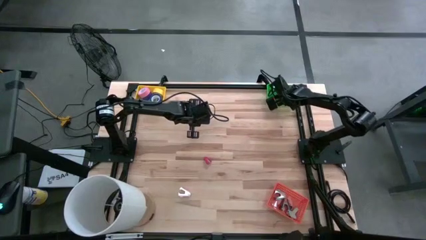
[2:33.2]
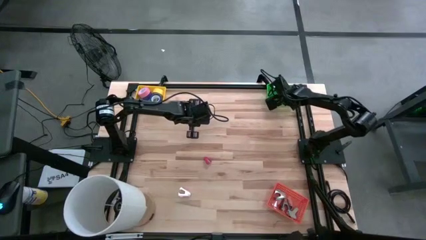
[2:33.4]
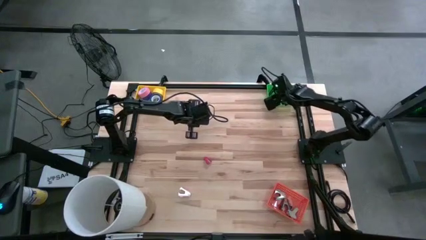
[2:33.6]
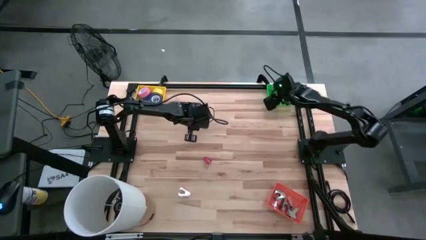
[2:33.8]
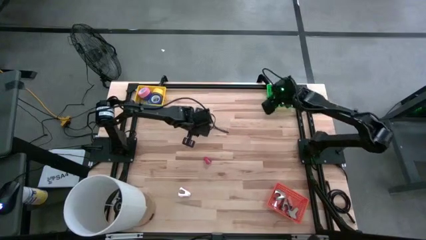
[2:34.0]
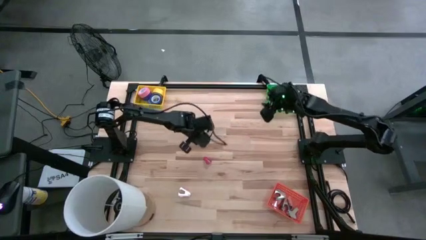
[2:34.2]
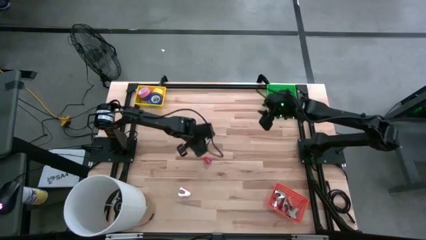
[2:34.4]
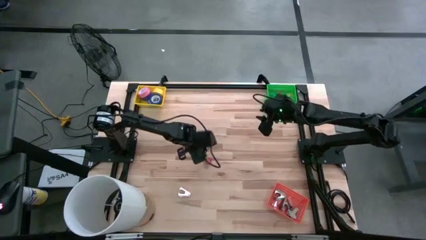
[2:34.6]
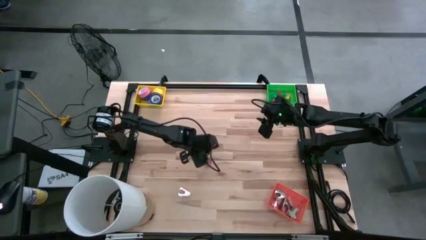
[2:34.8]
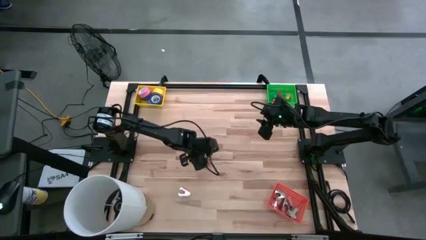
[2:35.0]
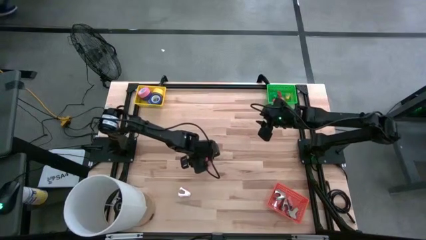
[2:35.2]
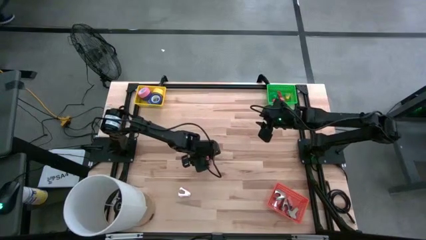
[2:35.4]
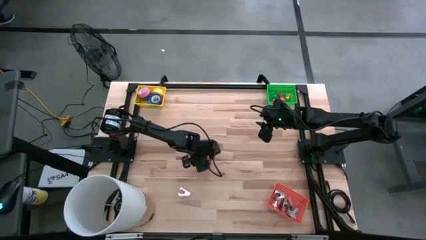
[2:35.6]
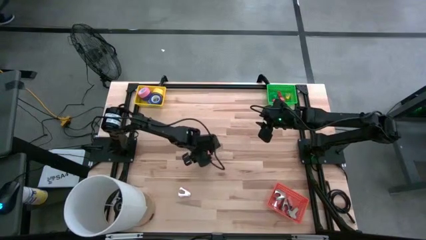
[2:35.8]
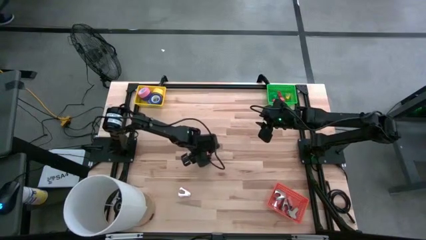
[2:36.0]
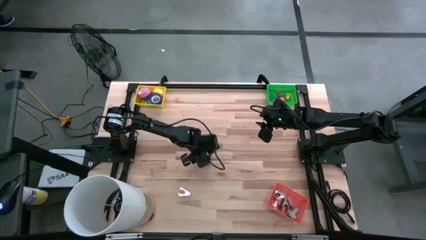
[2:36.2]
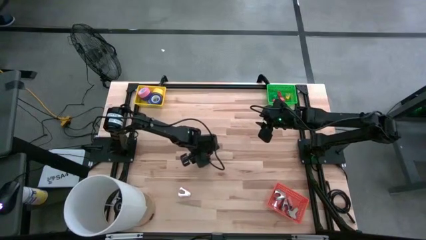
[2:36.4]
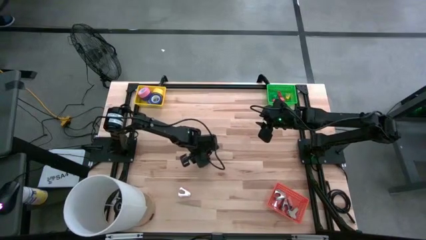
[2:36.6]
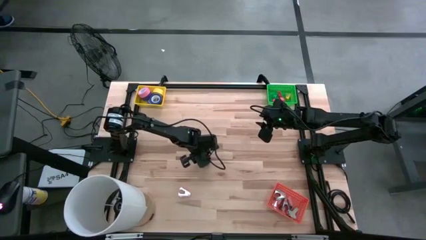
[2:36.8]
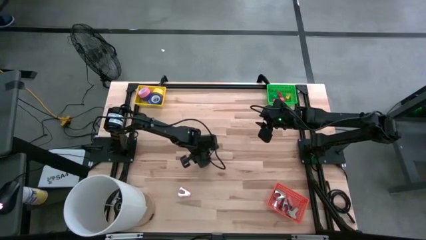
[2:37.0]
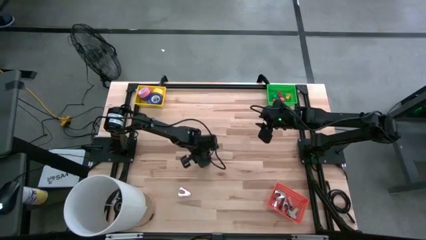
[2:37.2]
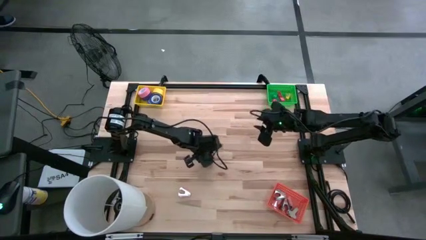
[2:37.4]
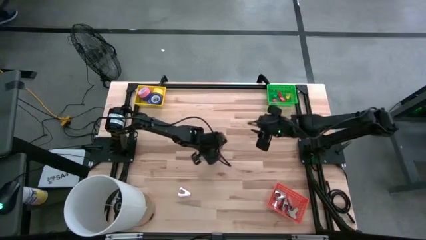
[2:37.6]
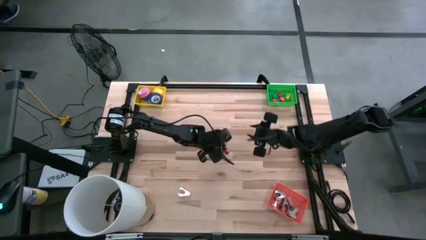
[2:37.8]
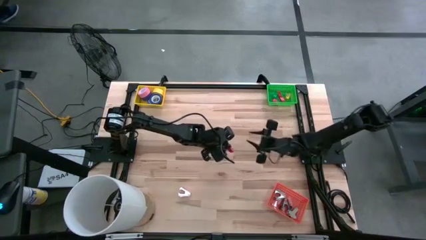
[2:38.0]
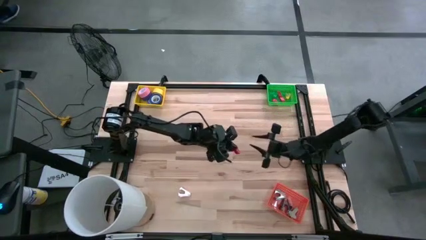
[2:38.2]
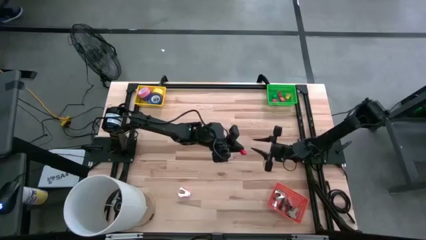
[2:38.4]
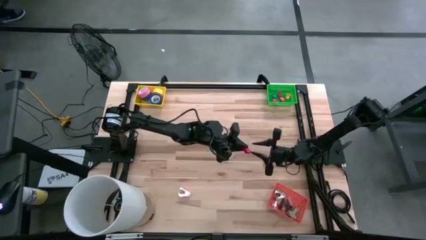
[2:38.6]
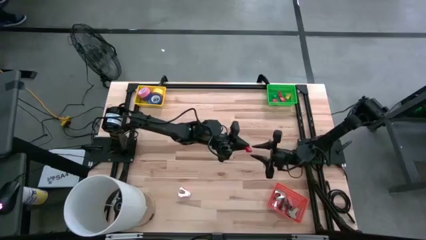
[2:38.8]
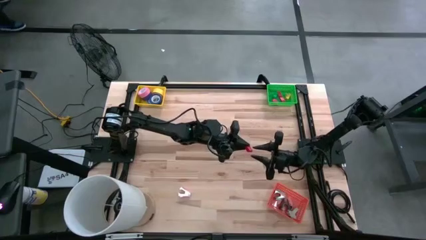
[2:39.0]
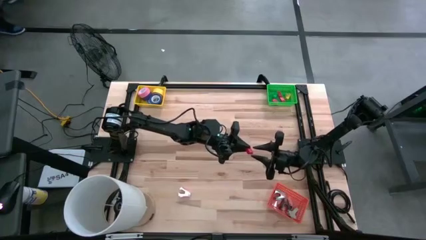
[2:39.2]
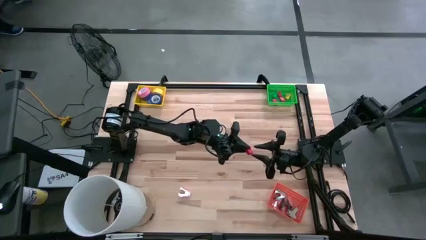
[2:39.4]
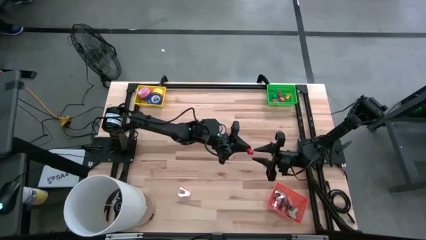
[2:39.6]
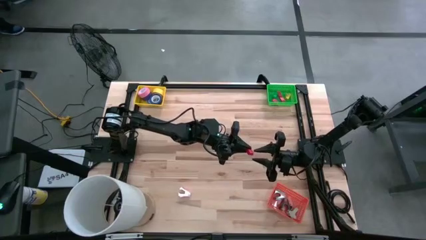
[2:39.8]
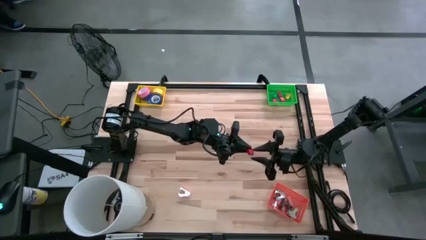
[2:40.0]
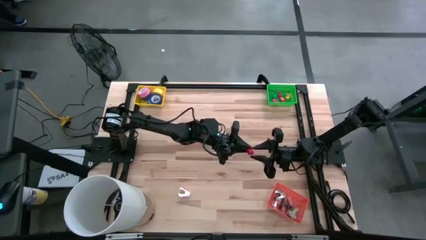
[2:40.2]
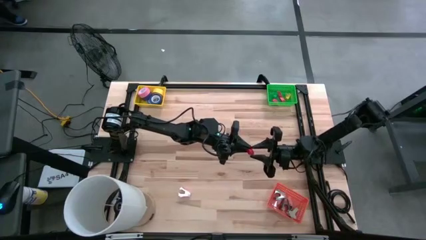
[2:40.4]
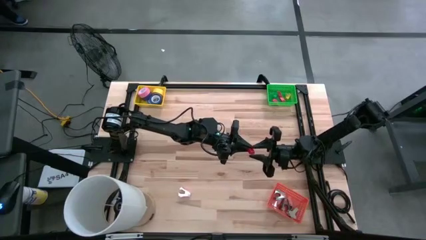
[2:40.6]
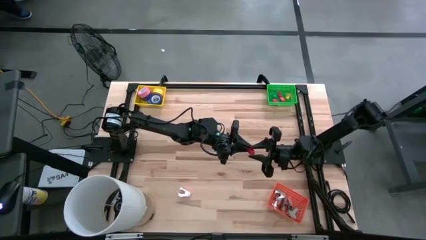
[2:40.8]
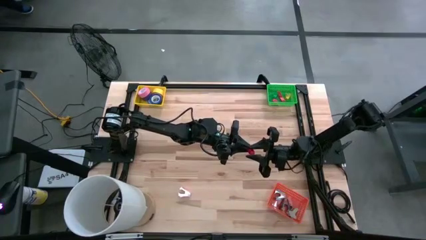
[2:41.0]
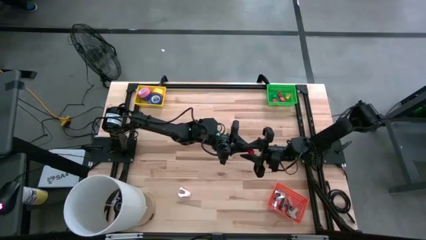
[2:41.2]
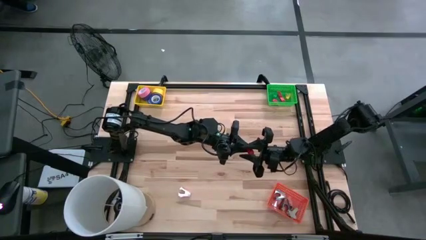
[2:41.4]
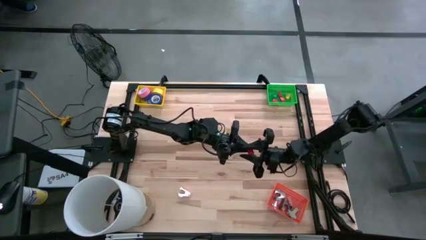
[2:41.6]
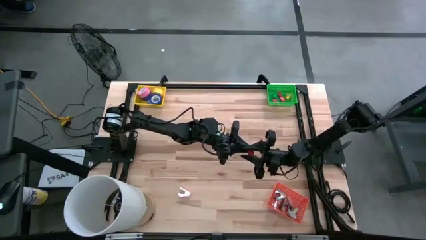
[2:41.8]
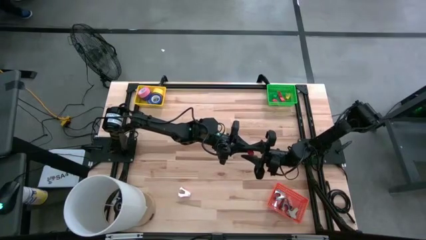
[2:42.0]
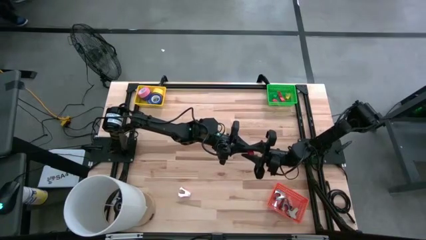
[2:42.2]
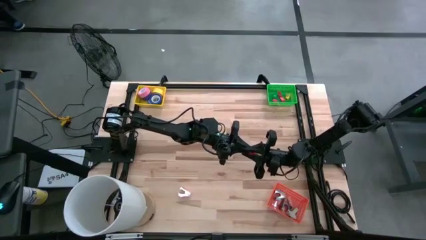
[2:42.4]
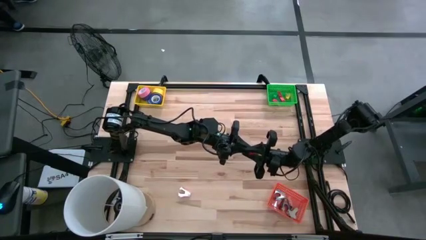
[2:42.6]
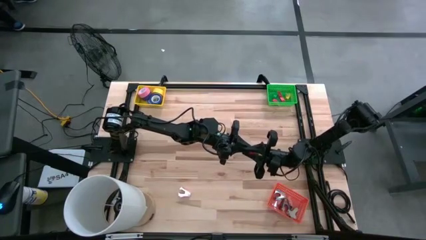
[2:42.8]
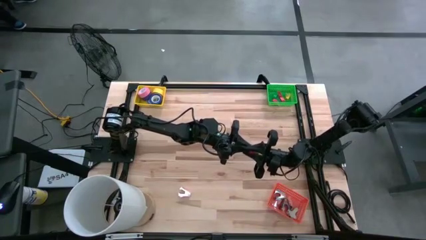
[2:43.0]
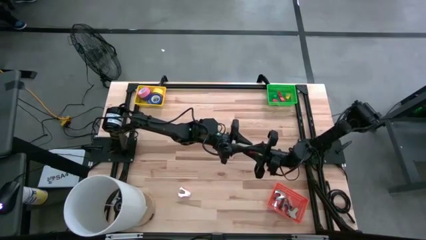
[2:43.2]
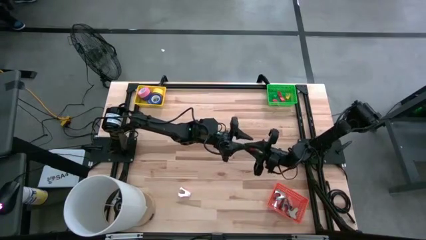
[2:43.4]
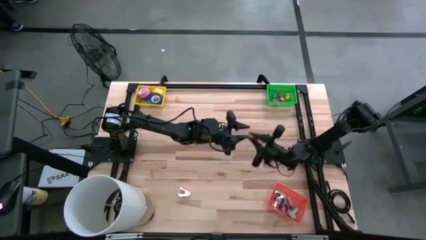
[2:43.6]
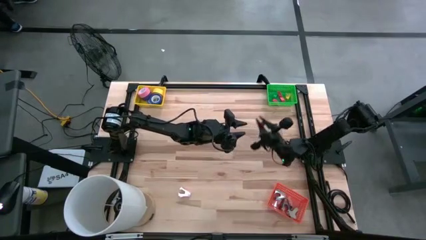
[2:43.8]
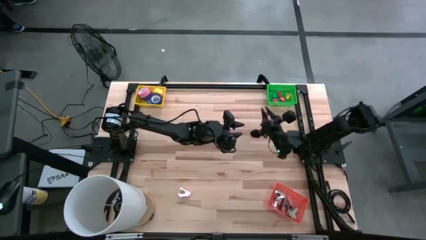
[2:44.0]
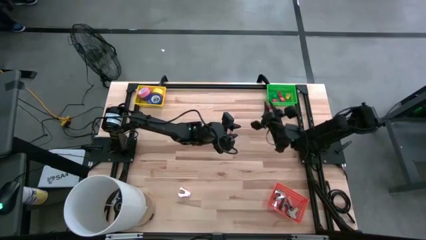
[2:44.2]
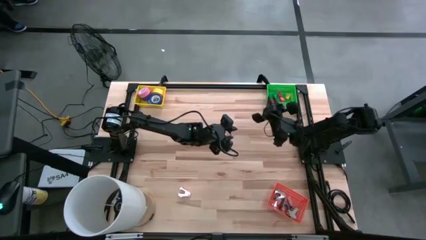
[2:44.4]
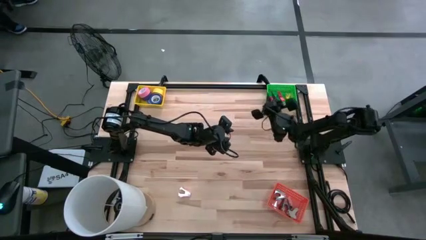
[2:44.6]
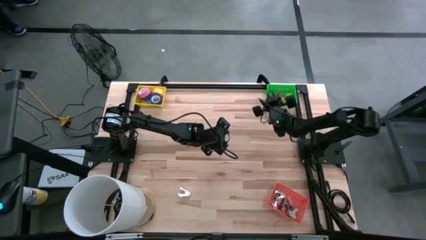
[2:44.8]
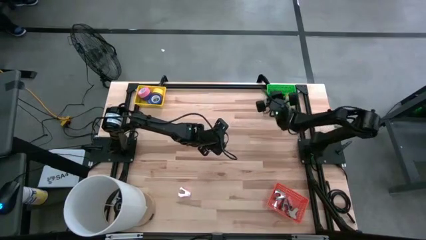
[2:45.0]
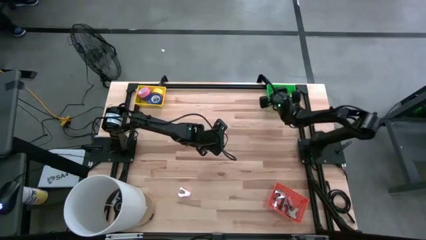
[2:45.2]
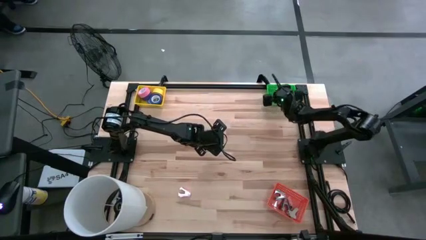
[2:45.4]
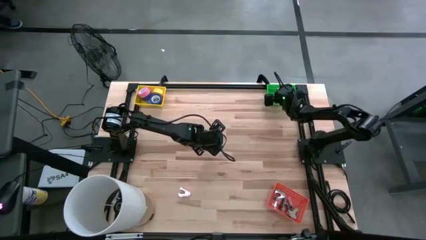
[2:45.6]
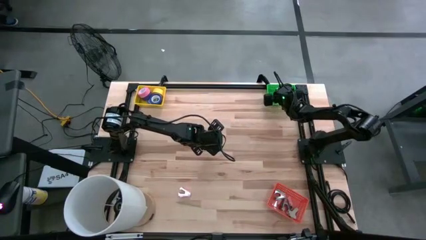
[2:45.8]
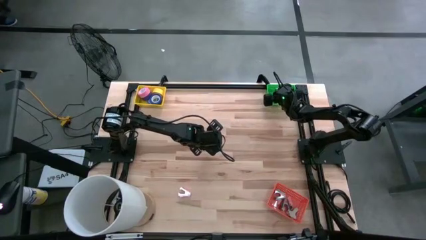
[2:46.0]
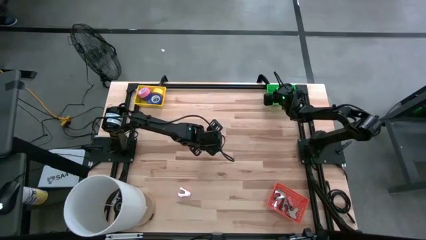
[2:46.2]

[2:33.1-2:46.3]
Task: Pick and place Stapler, Stapler remover, tape
Put the red stapler into the green bin

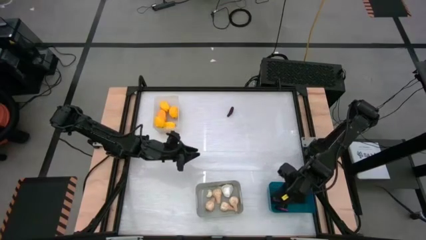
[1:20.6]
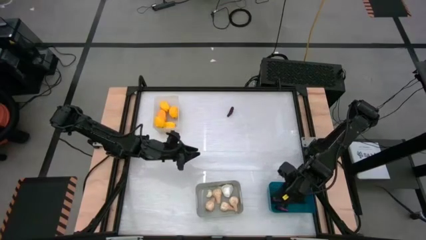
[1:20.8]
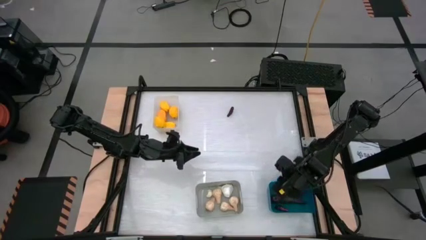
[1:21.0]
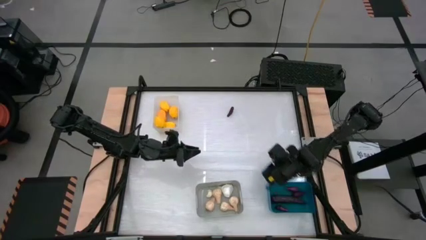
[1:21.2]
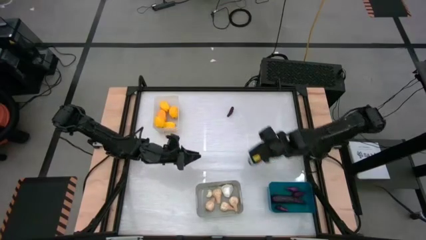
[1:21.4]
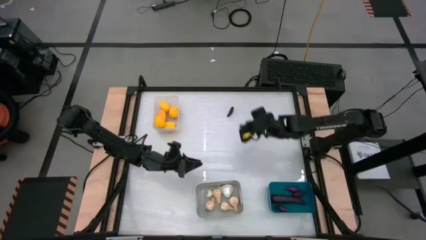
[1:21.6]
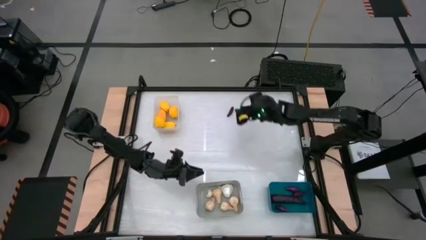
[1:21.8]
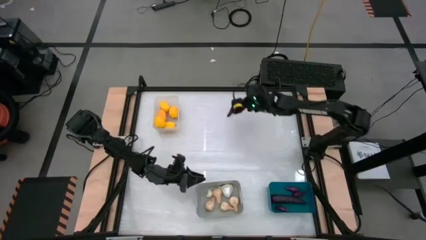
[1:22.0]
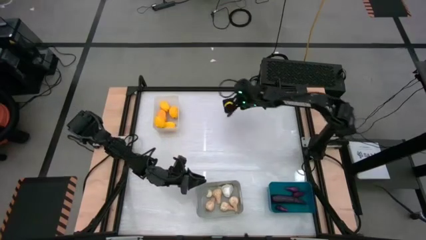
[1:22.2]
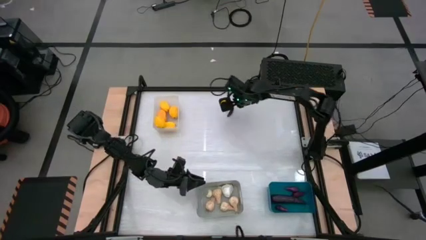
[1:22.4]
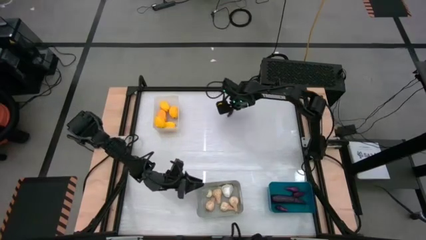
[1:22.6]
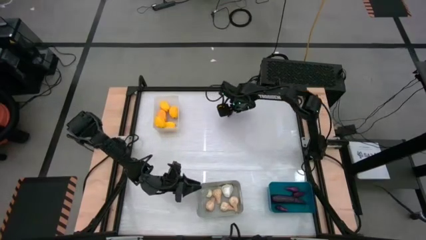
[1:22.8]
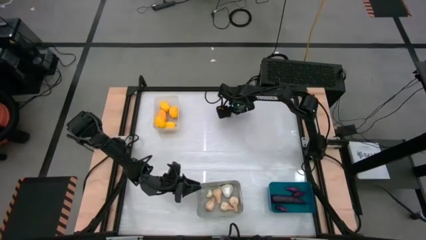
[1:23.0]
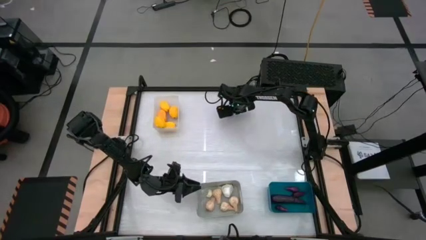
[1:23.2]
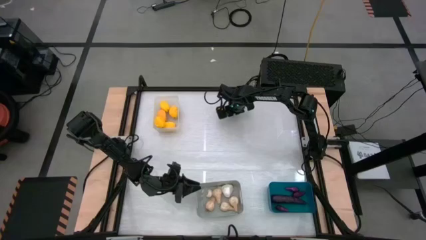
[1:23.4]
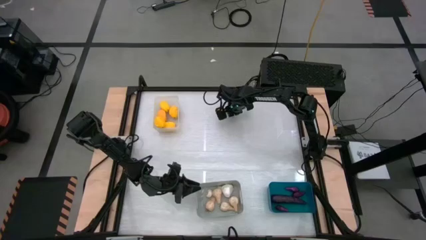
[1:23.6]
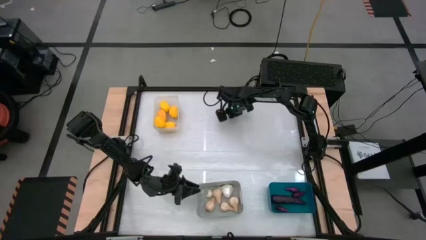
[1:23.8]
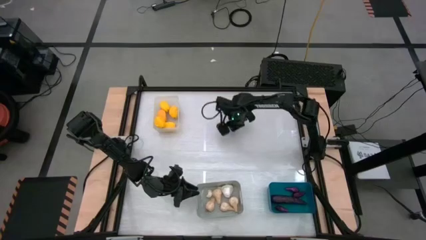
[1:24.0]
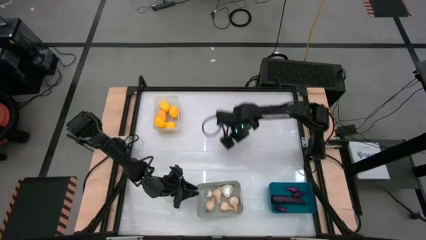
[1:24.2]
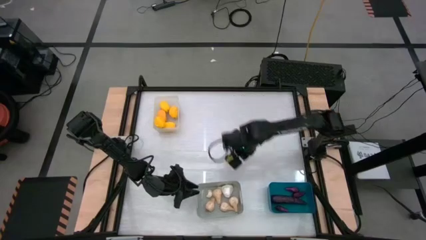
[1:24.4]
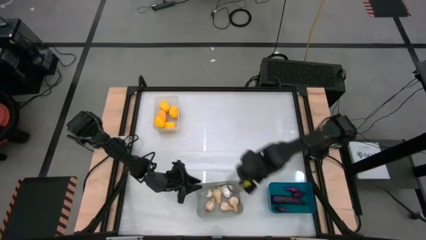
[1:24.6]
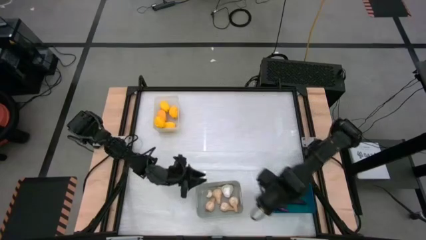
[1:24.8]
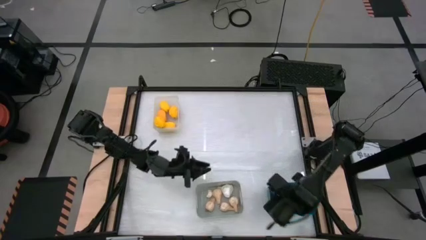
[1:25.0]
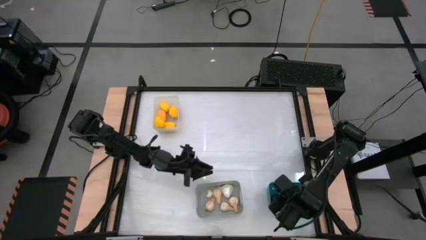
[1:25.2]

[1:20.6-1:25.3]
Task: Sort produce into baskets
Put the eggplant into the blue bin
